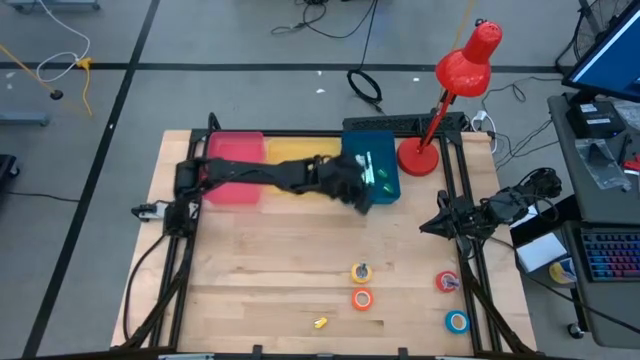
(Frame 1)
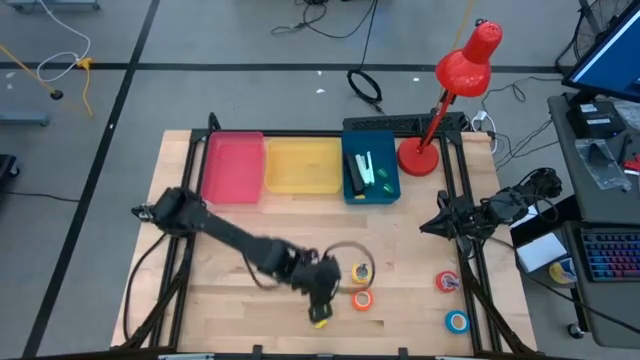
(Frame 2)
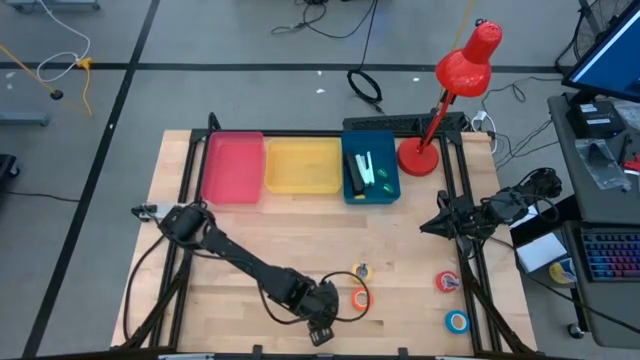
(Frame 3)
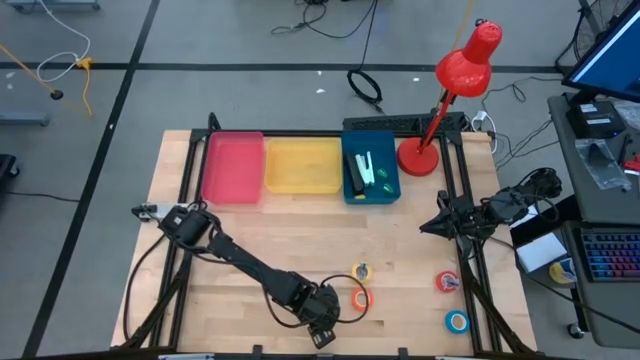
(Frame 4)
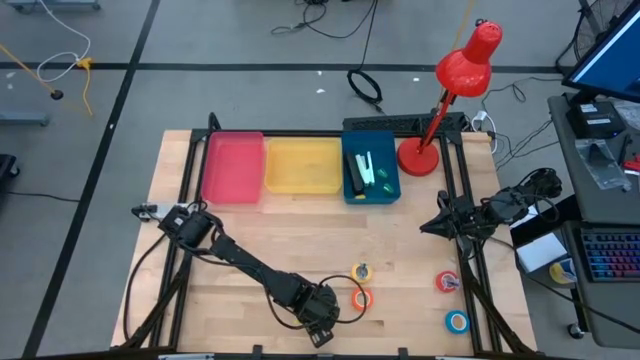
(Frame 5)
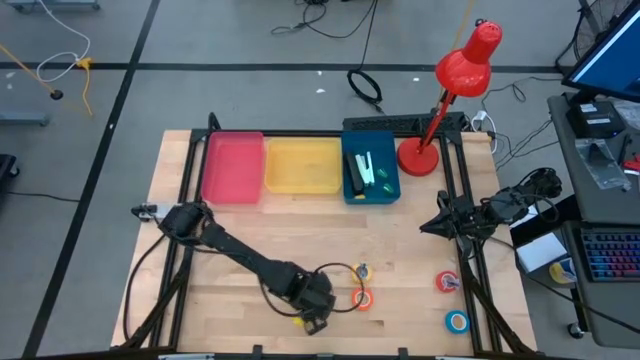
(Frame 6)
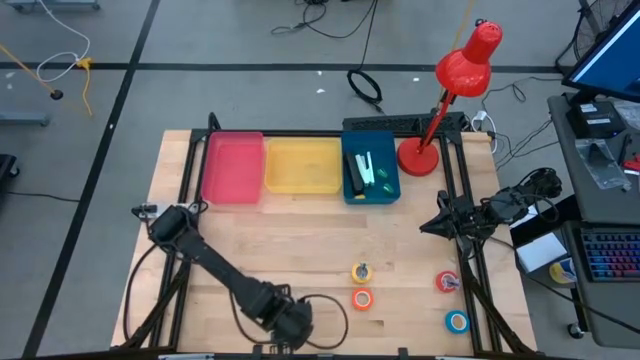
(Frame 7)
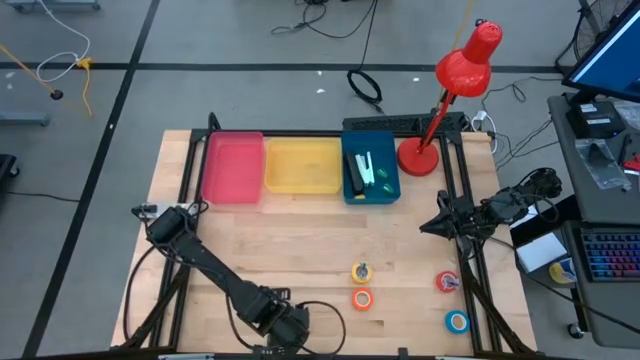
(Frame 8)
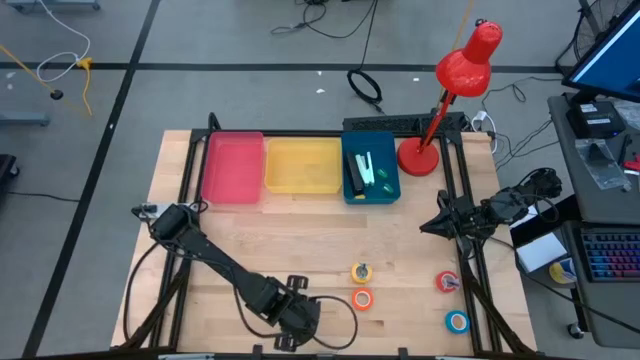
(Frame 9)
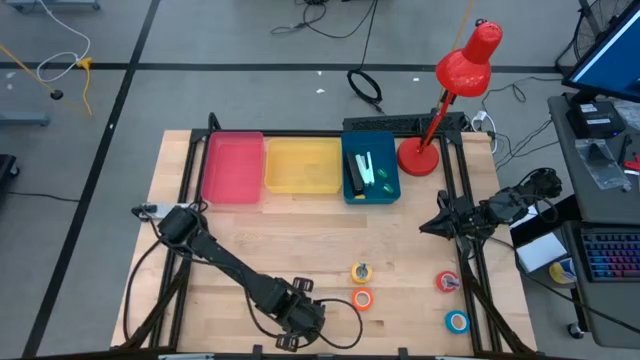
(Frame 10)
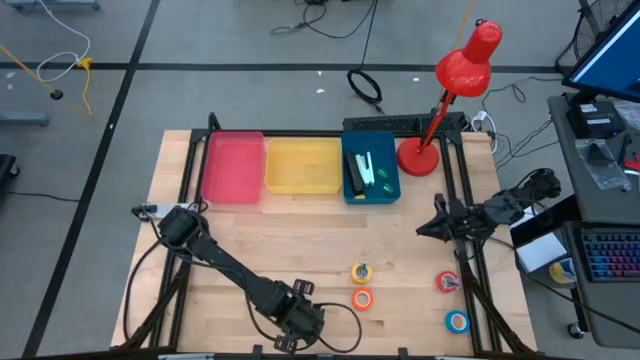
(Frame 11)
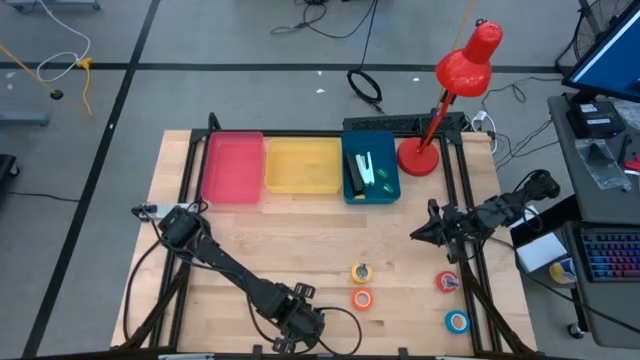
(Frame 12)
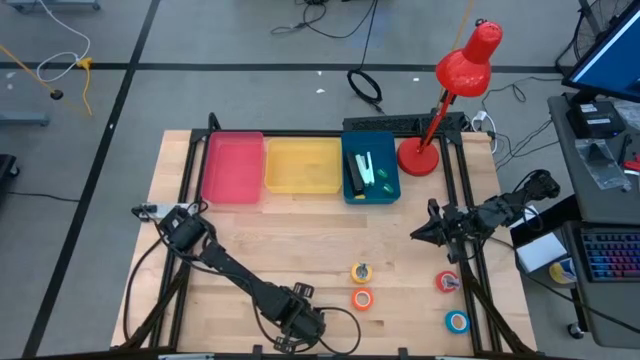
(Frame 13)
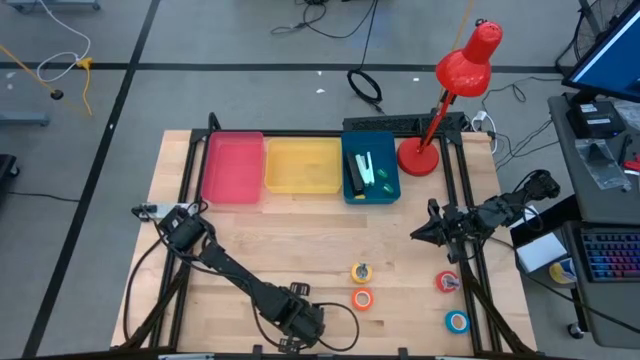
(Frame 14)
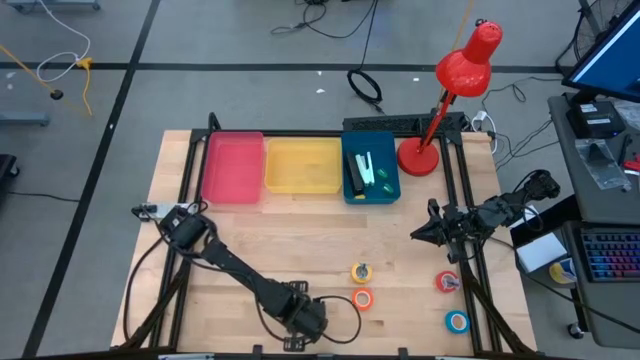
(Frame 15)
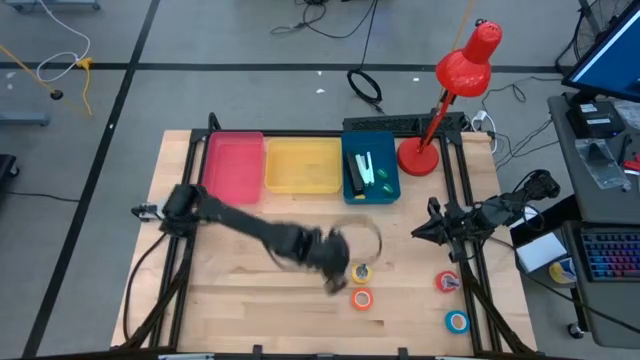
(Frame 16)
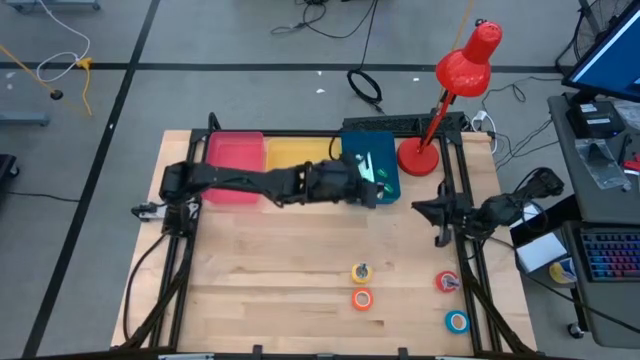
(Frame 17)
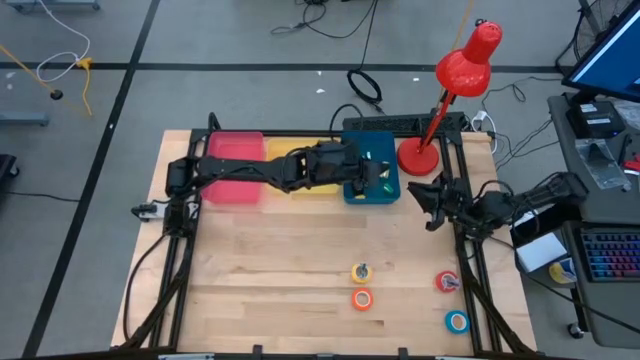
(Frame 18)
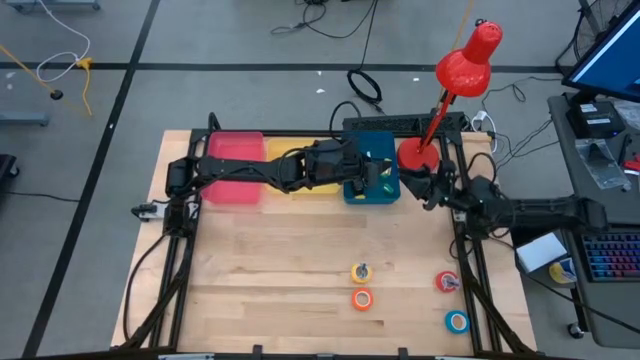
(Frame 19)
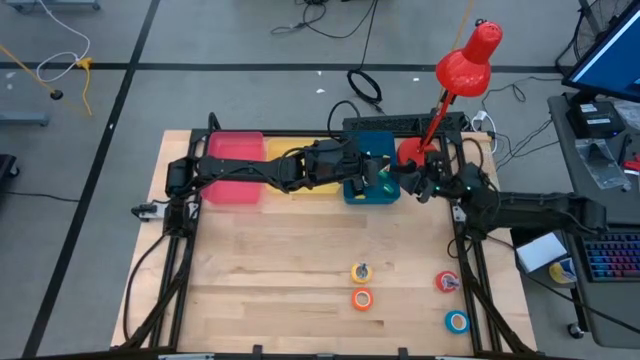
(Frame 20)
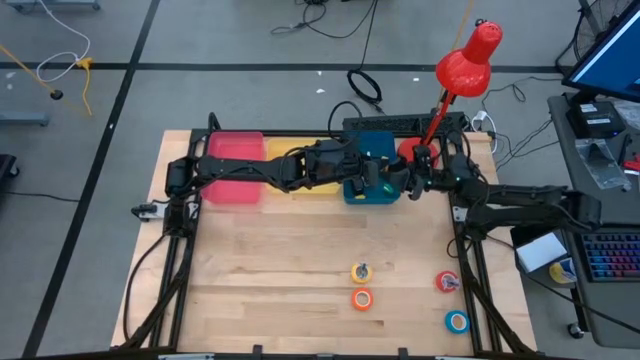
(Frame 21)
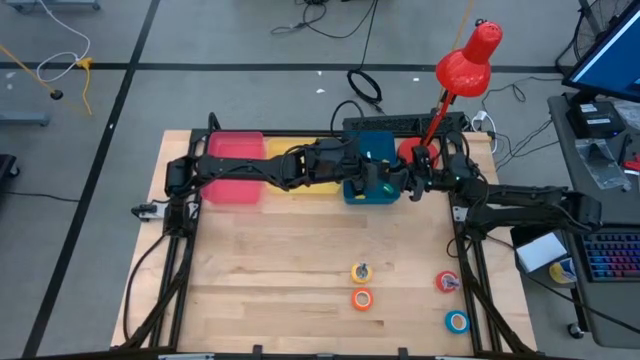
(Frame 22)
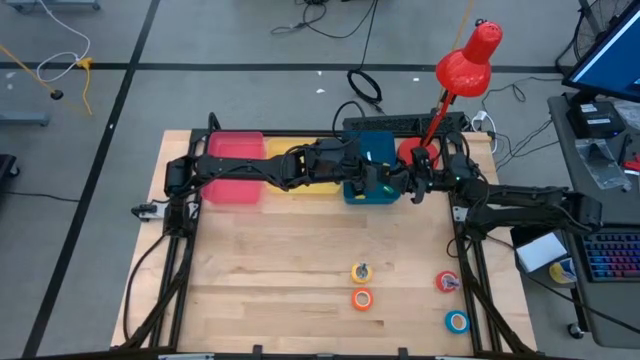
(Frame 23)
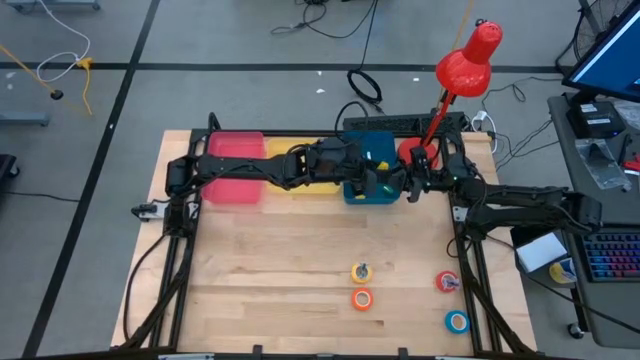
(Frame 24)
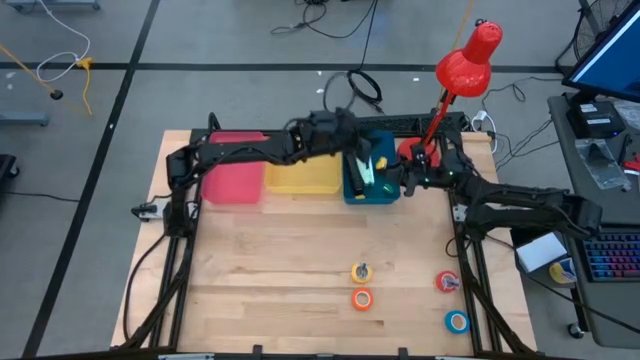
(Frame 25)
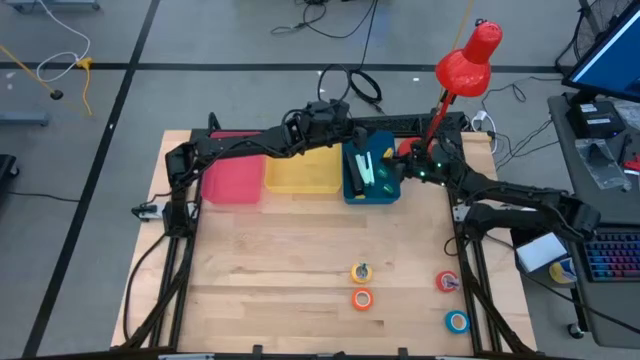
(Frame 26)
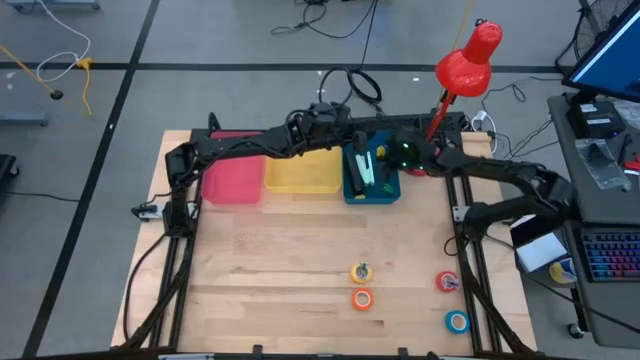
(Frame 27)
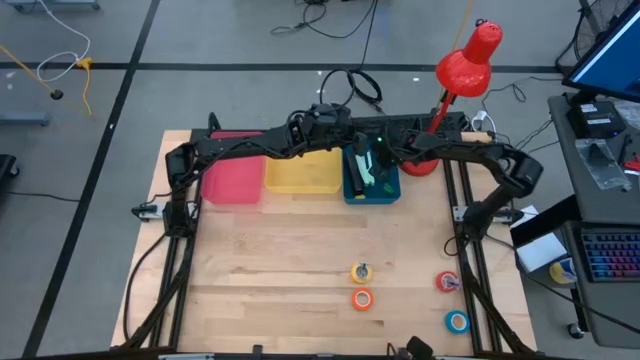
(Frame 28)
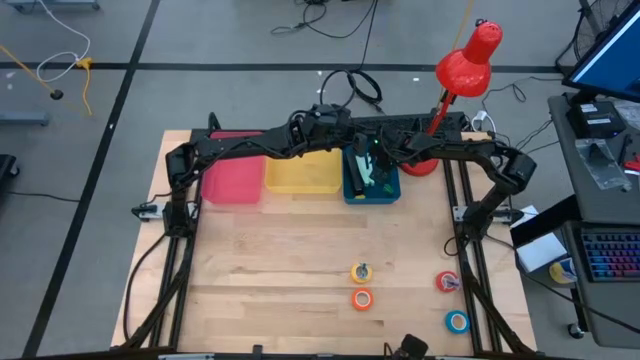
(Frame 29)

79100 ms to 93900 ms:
Task: Pick and place Stapler, Stapler remover, tape
Put the yellow small stapler into the blue bin
